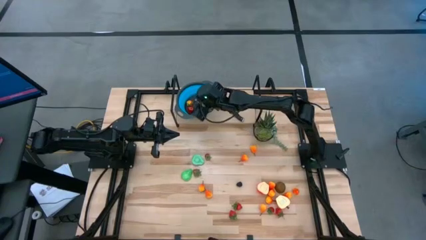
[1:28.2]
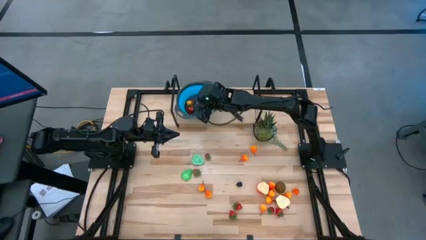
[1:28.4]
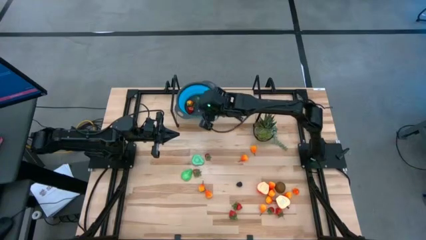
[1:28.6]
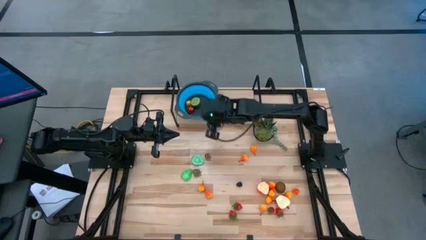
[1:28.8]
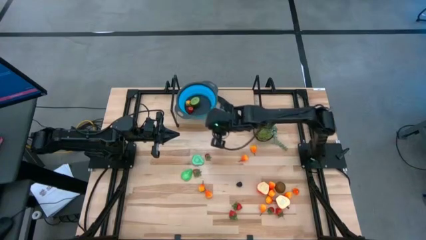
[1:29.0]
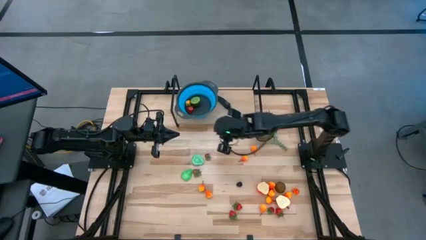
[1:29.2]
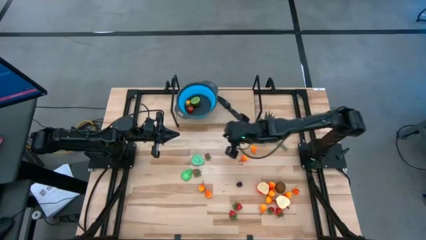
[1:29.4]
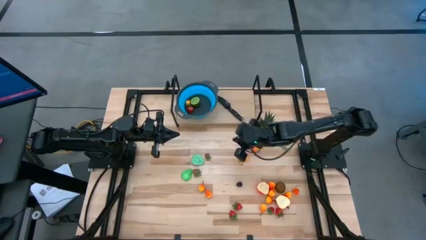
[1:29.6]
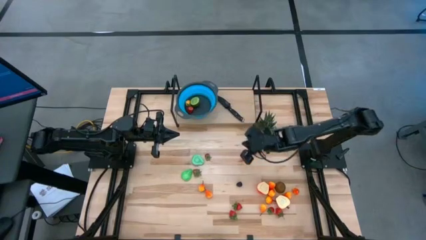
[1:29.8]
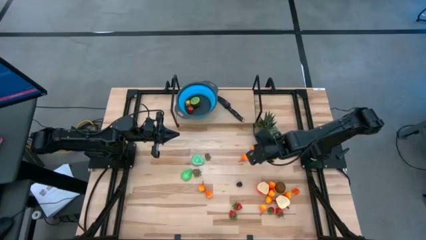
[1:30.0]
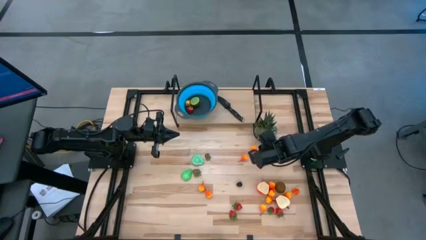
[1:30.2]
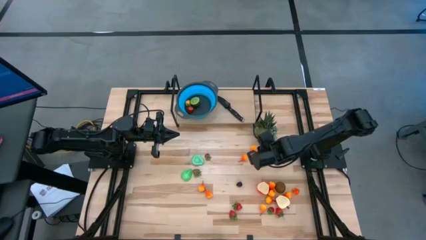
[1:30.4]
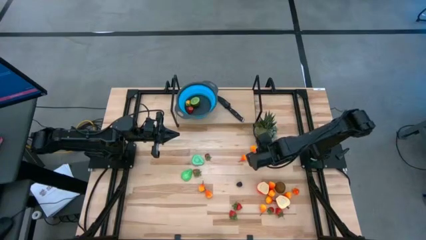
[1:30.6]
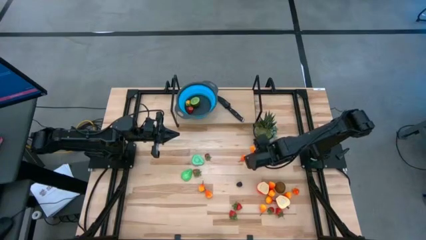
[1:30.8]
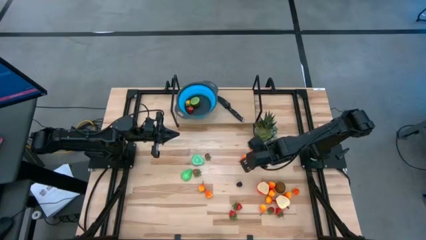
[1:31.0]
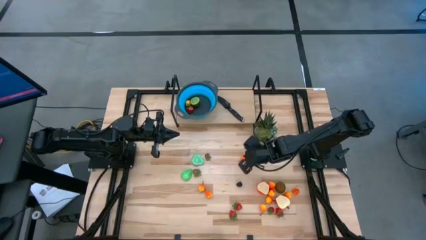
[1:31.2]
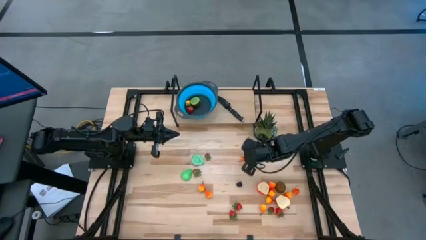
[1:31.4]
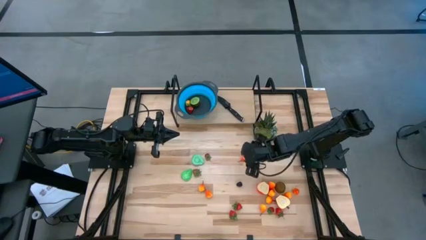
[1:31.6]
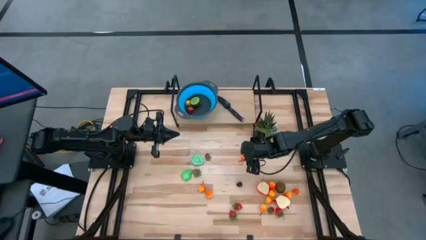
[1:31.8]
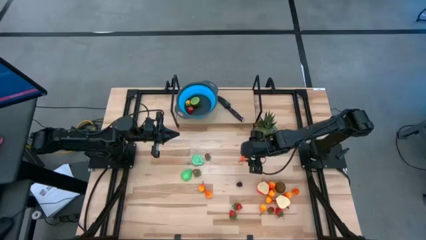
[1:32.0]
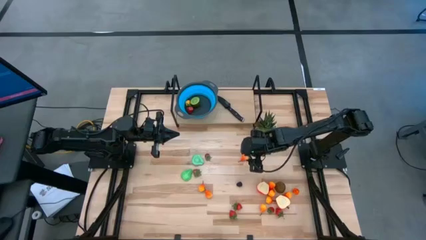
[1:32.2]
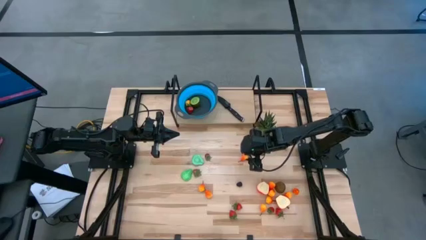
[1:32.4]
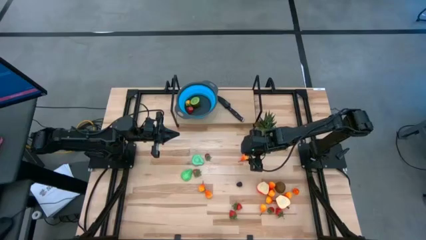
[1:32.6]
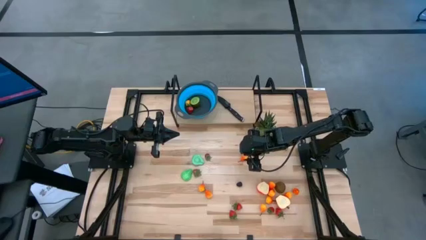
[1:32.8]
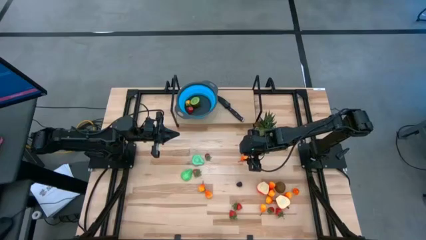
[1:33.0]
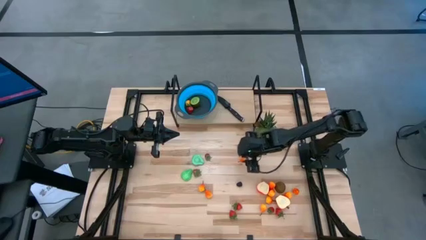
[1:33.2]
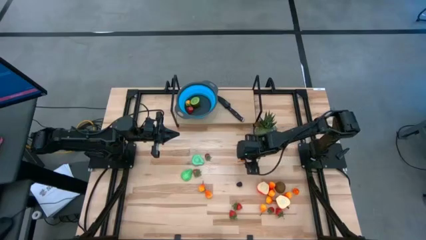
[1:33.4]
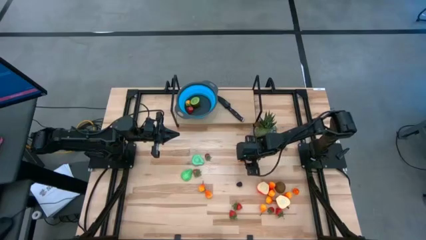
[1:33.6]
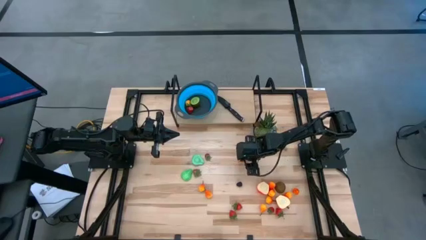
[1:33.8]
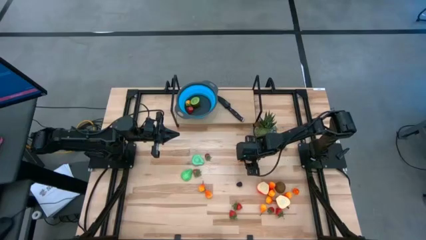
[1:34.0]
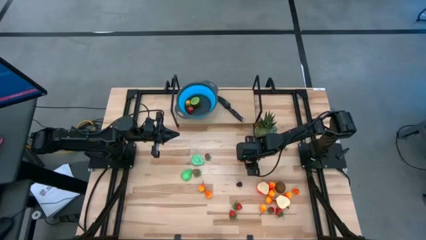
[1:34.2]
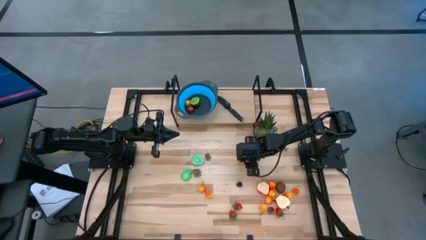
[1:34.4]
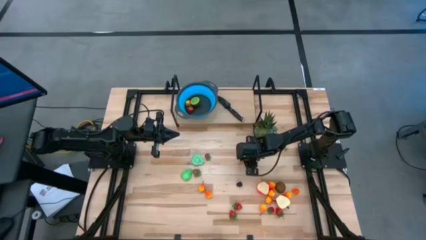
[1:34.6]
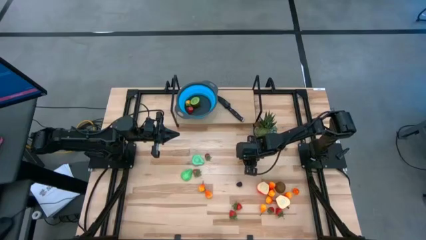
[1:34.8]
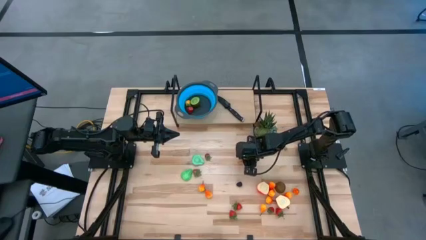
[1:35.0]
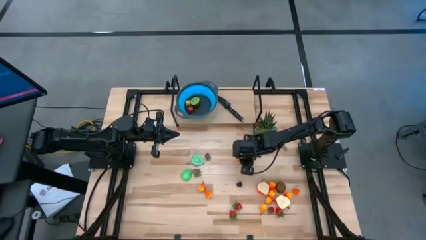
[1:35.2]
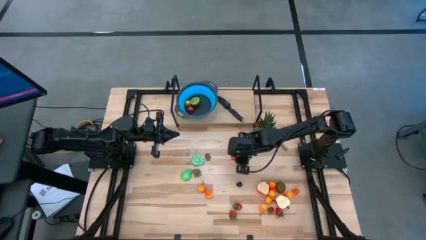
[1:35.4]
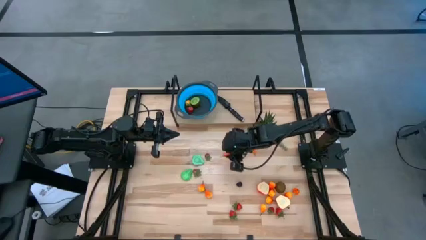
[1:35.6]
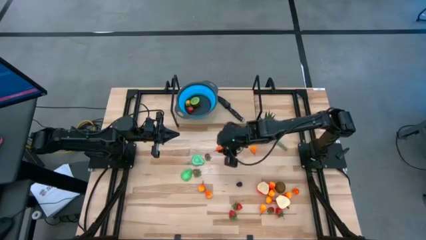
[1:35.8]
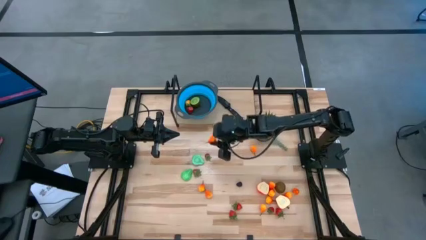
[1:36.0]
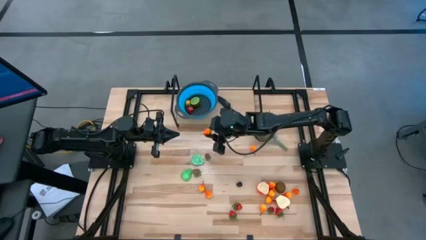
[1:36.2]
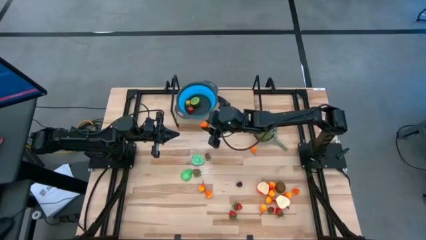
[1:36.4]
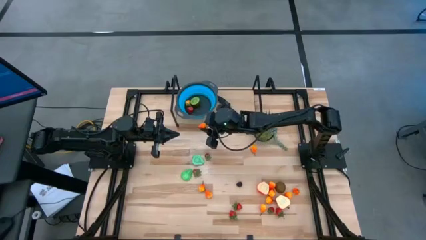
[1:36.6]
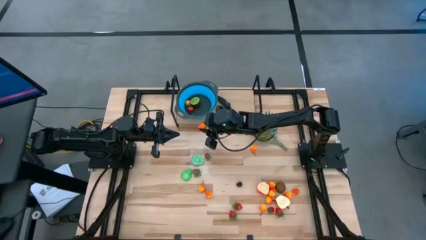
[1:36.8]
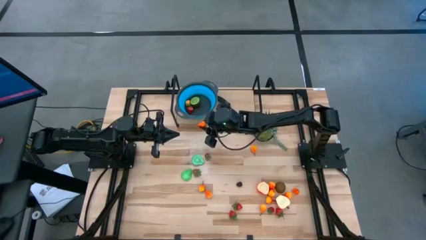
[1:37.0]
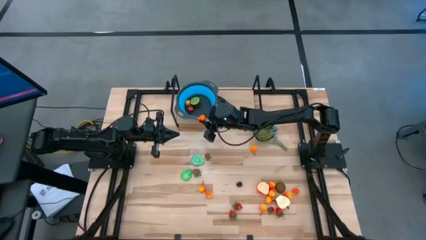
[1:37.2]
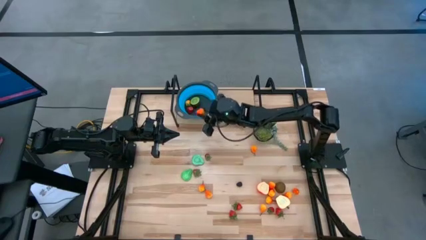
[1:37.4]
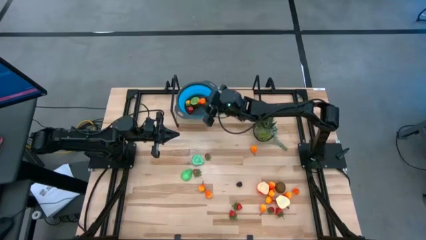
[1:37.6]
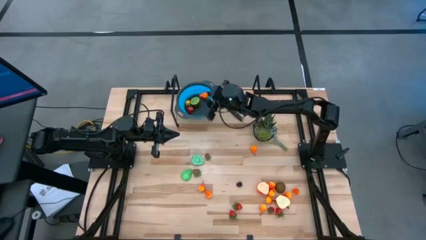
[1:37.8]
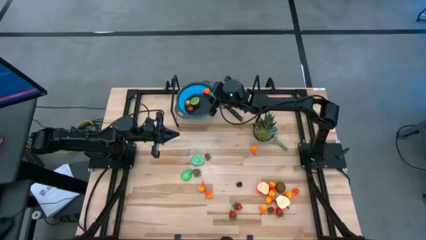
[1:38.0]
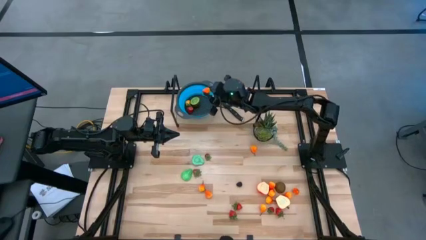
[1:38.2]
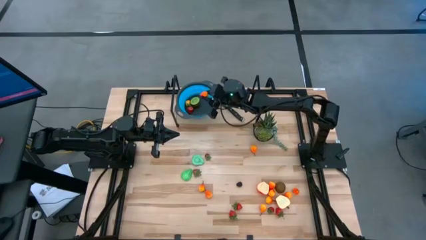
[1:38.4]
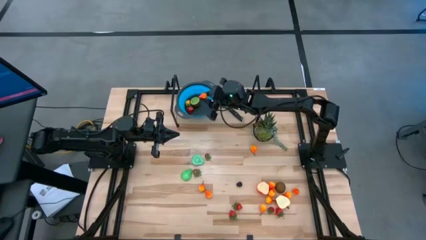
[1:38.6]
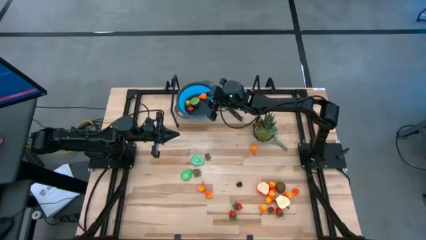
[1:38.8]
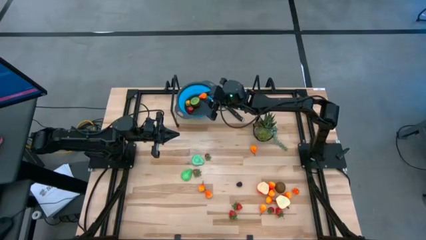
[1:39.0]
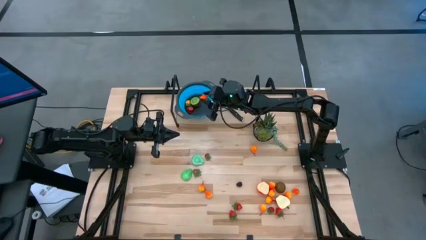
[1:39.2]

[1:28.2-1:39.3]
Task: Pick & Place Fruit
Put the pear into the basket

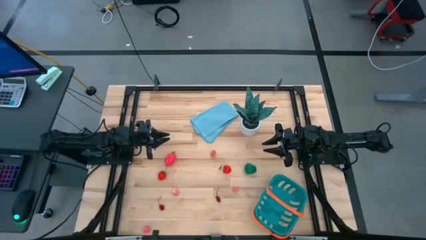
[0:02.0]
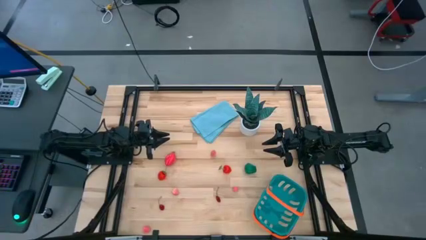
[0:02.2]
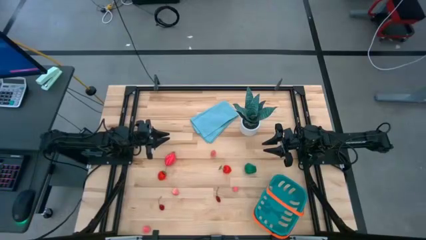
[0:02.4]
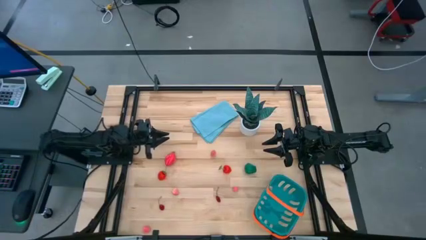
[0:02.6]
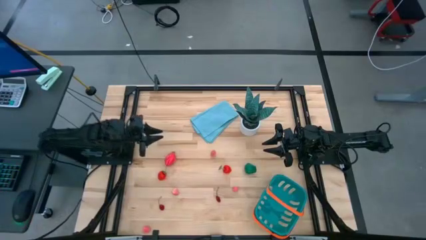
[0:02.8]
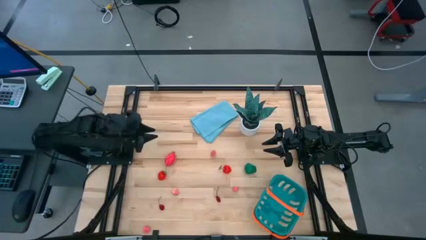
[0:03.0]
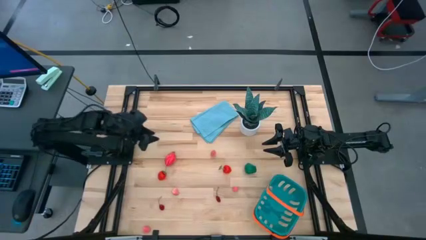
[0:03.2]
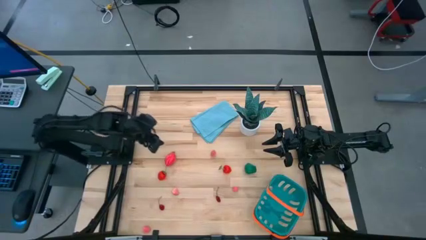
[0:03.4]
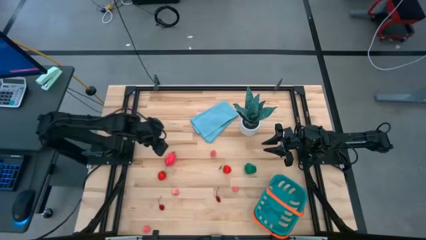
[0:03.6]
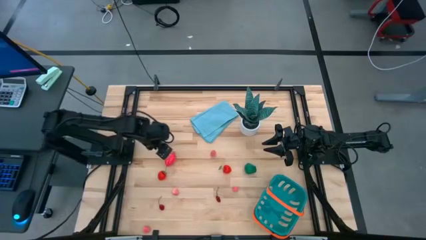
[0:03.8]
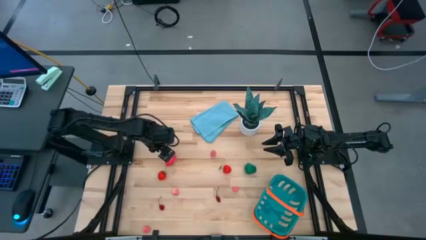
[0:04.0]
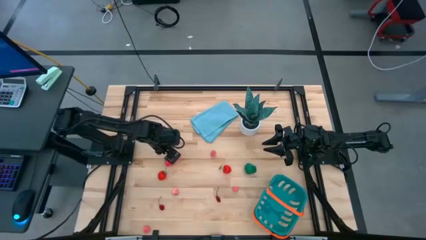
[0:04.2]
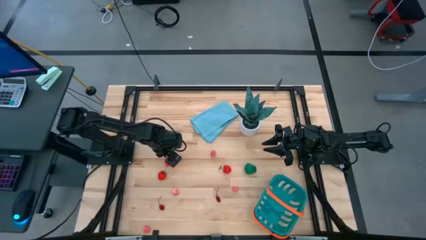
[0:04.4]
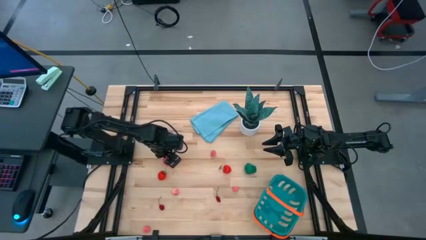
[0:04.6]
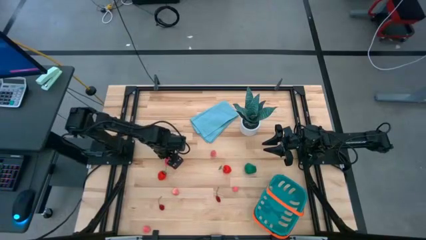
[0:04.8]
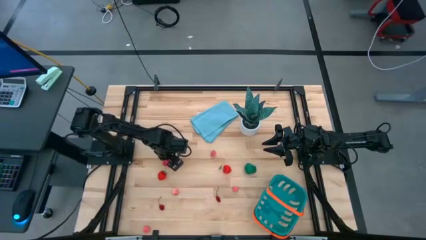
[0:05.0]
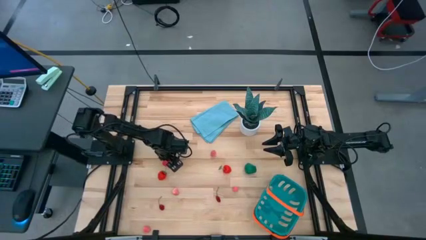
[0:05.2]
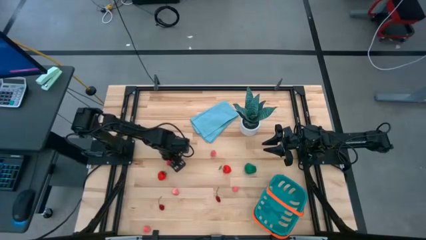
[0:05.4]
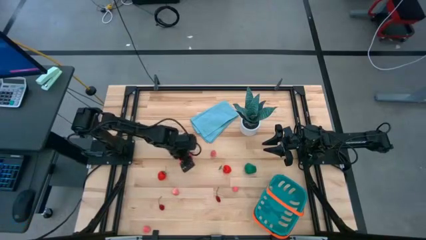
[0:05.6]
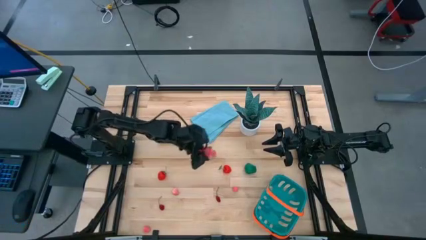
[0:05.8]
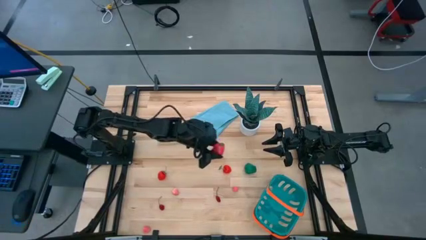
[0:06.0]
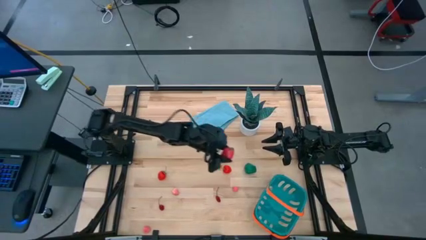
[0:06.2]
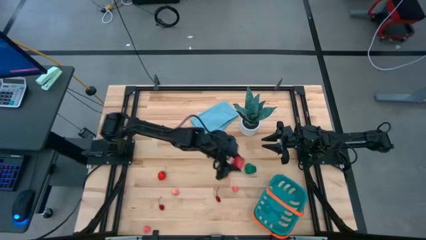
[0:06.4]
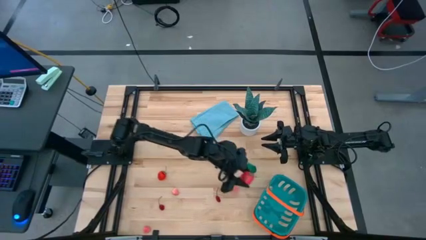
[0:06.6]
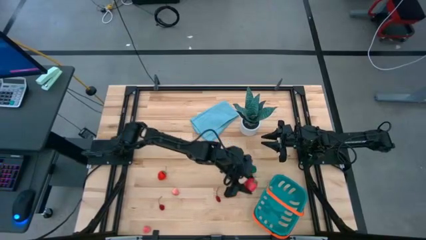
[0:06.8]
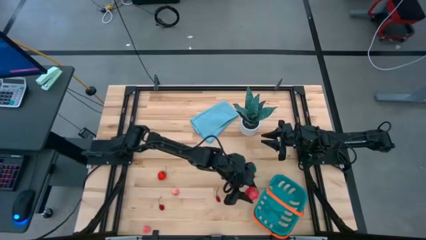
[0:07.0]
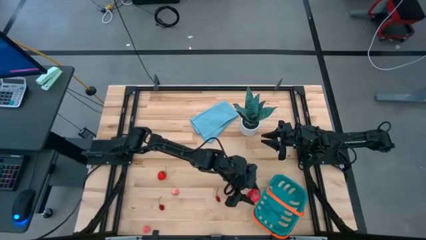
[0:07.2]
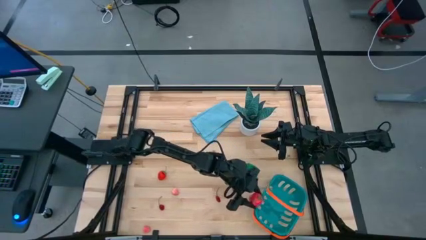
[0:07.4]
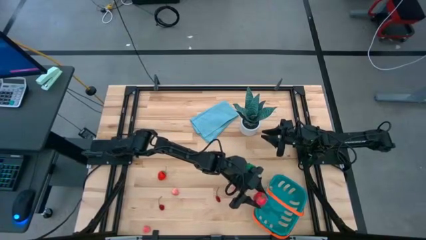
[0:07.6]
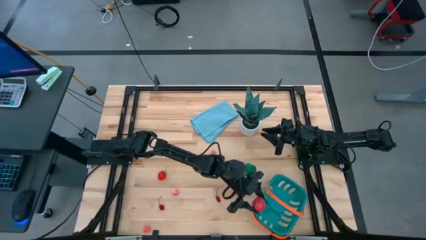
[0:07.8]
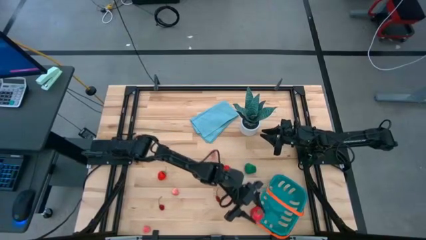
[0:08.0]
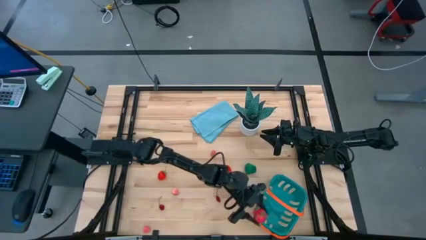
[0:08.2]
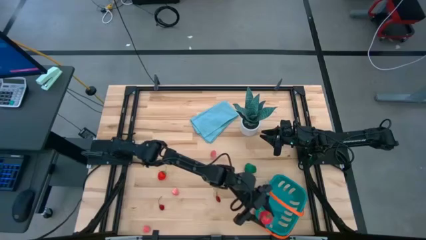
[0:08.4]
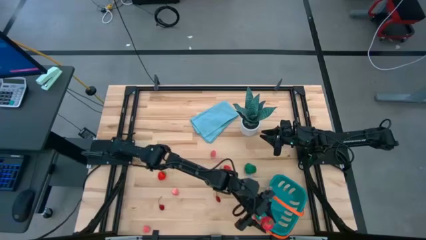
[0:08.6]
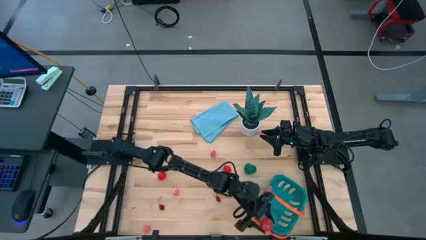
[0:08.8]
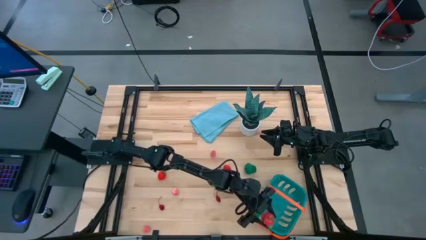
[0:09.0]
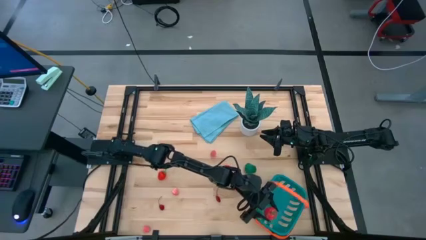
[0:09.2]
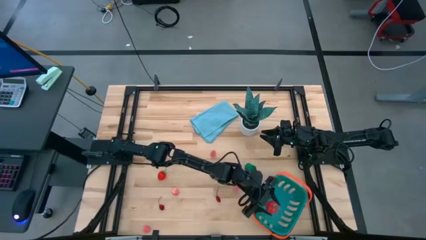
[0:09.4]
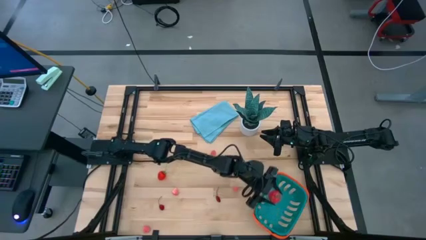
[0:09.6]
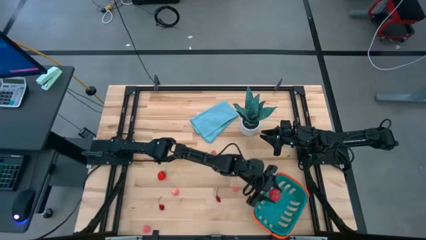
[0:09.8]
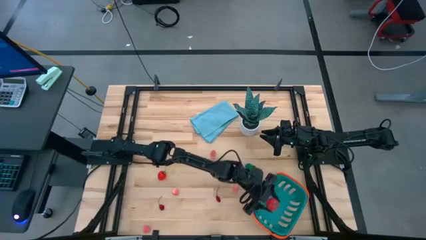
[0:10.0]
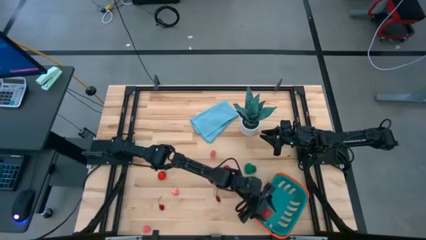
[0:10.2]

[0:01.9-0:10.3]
Task: Pick and placing Produce into tupperware
Put the dragon fruit into the basket
